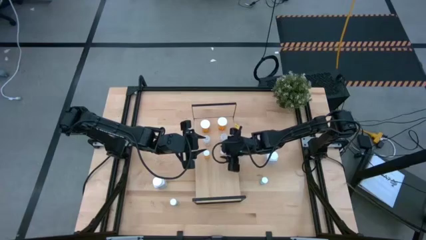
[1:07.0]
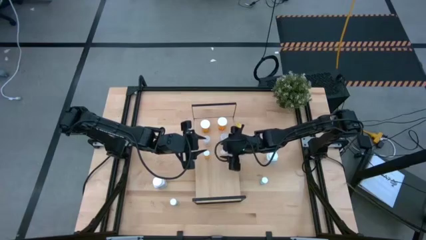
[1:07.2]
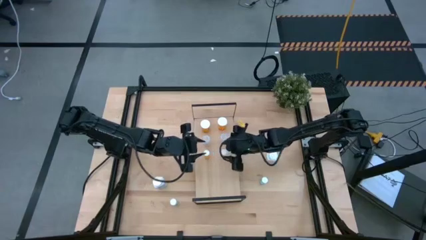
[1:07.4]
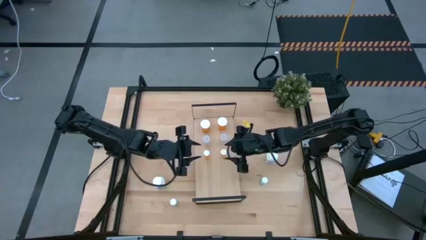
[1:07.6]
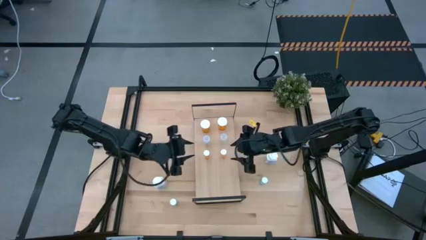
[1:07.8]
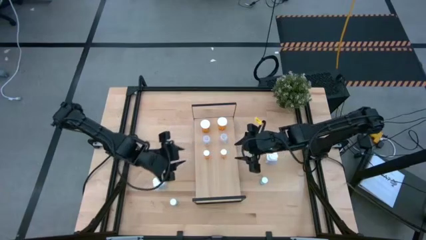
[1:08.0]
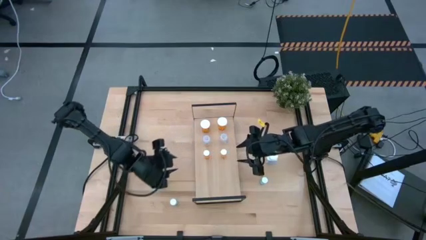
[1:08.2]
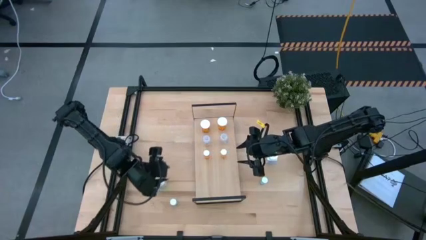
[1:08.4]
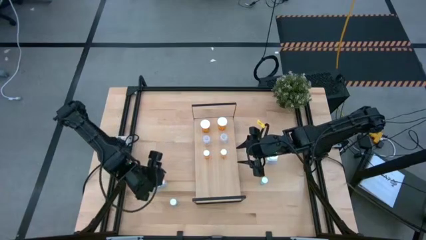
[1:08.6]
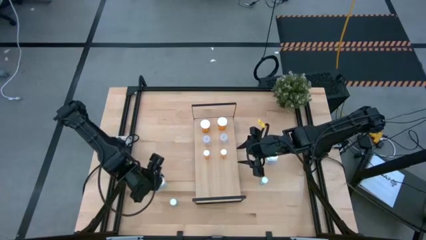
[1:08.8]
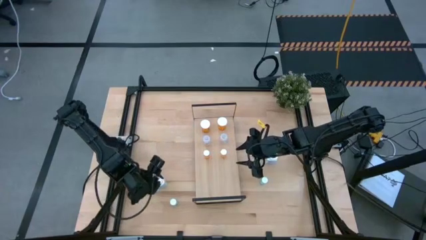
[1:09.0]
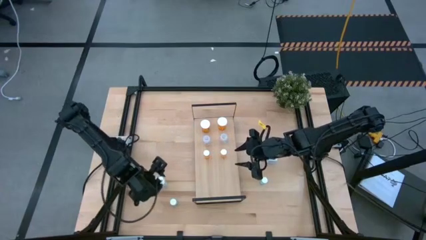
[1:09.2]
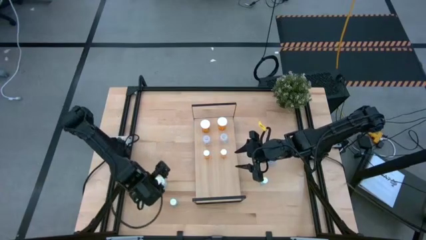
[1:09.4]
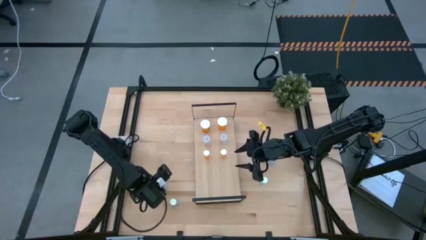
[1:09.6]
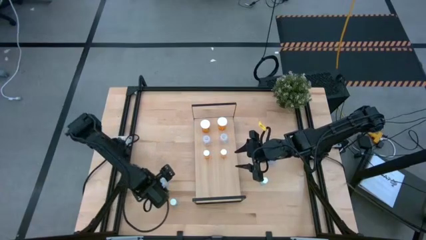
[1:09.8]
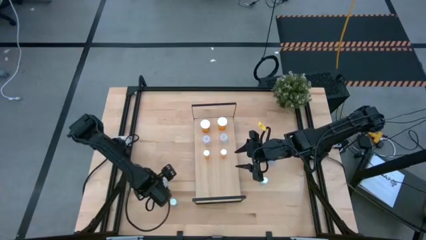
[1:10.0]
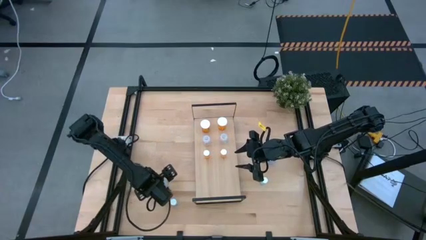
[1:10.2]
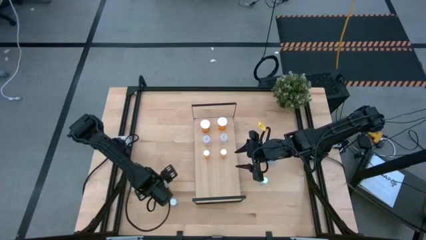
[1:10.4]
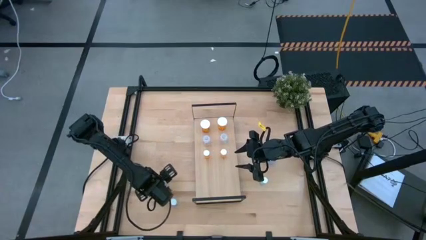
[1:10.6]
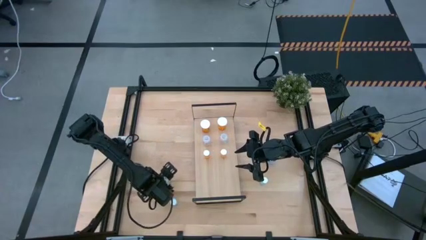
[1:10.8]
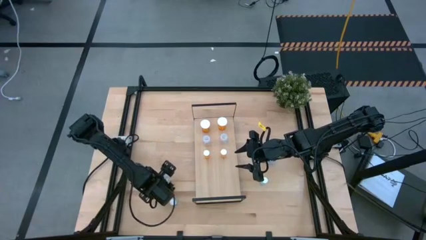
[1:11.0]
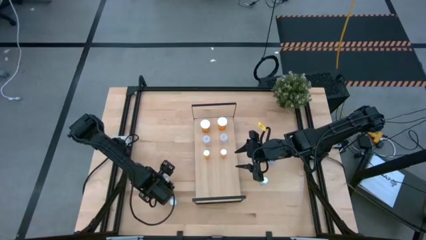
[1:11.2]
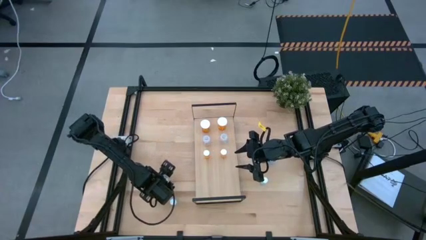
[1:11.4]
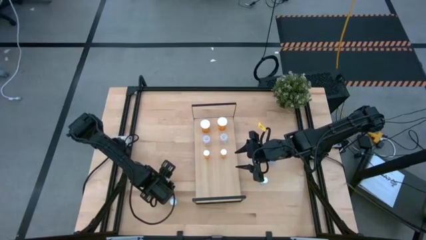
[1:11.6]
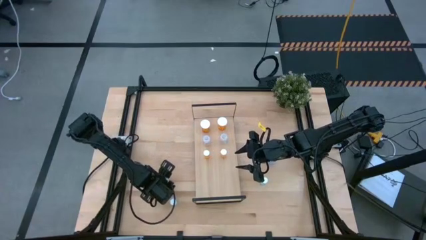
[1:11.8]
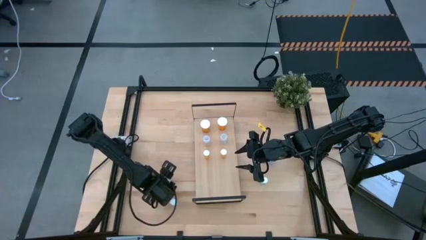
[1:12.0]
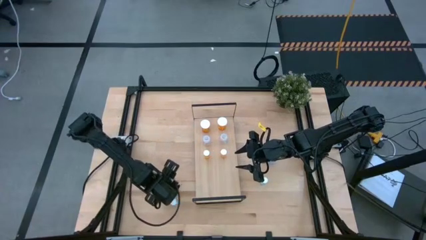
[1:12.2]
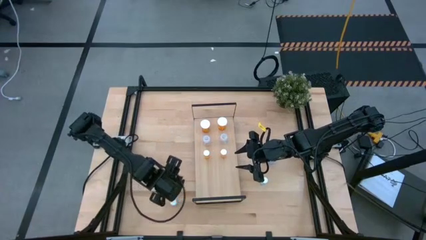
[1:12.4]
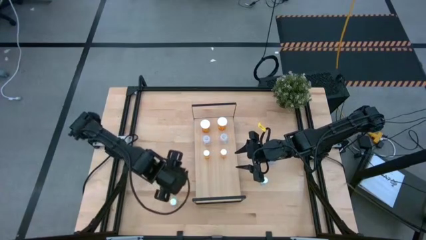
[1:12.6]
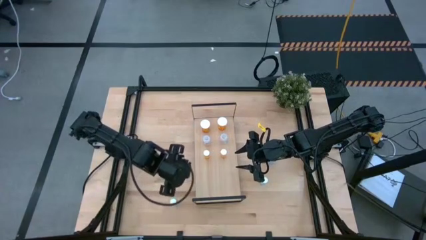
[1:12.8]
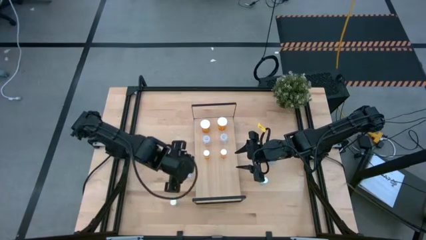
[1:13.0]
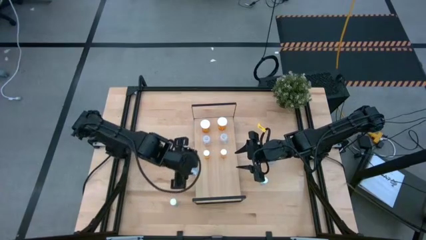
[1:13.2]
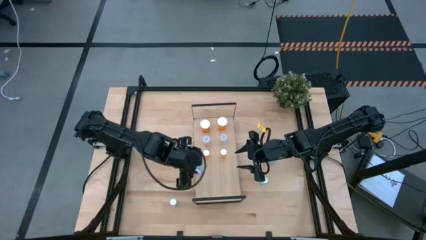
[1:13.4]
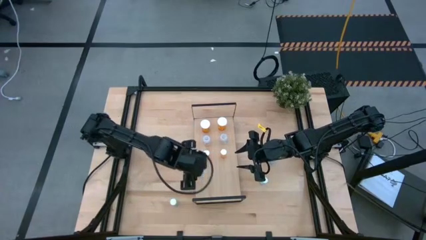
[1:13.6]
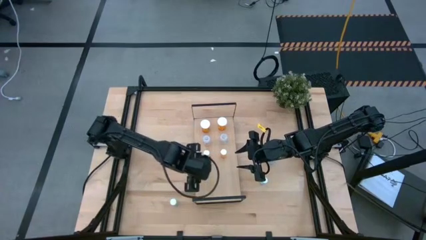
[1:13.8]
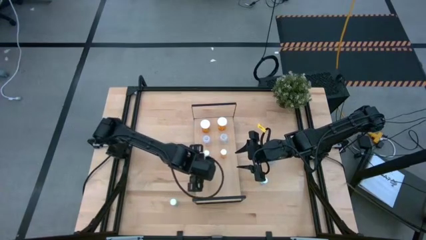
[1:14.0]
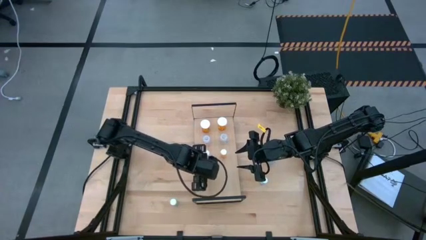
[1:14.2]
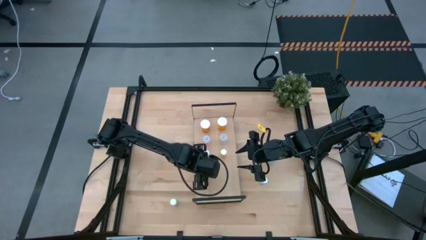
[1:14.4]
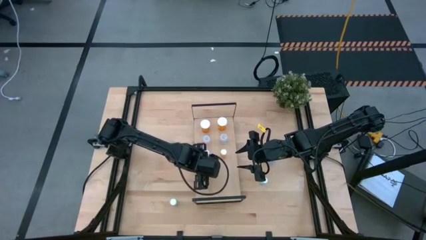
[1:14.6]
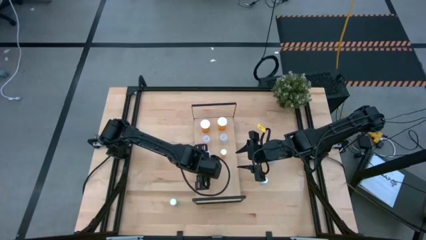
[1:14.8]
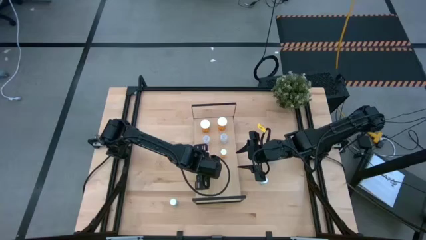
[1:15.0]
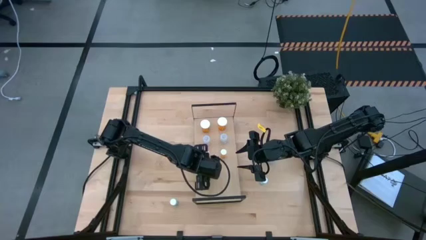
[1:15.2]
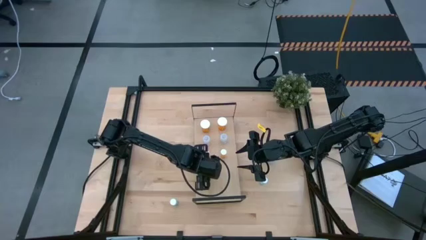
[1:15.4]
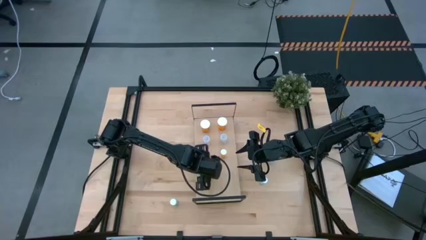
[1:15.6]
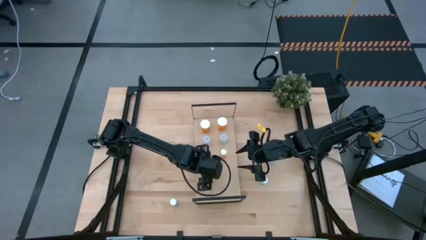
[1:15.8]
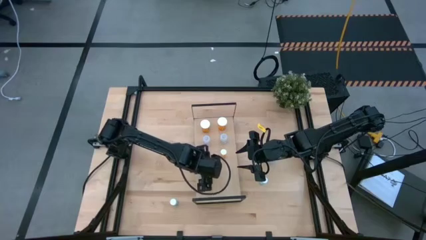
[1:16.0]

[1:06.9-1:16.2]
Task: Pick and place medicine bottles onto shelf by color
Put the left white blue medicine bottle on the shelf

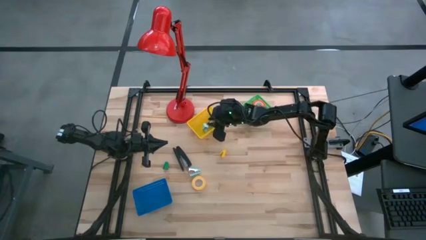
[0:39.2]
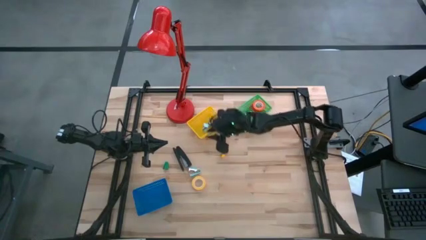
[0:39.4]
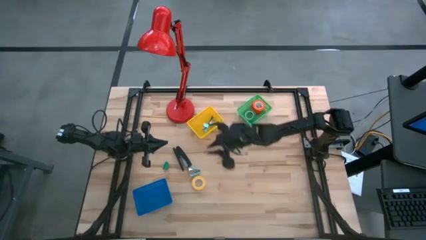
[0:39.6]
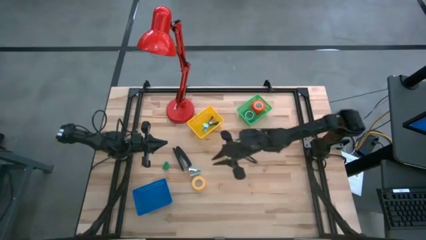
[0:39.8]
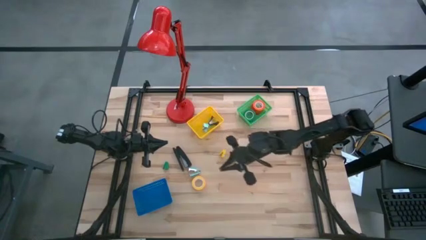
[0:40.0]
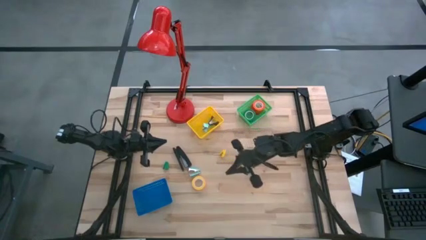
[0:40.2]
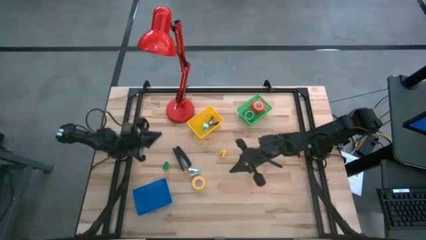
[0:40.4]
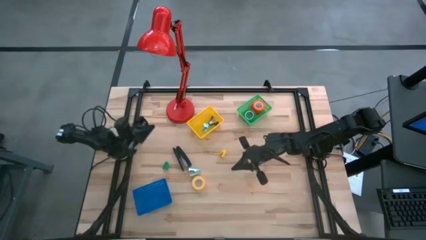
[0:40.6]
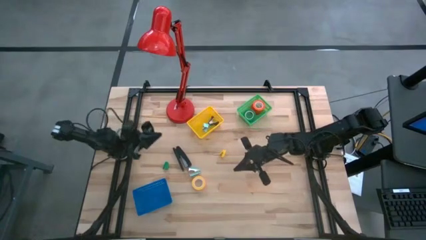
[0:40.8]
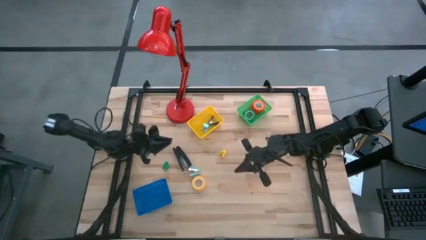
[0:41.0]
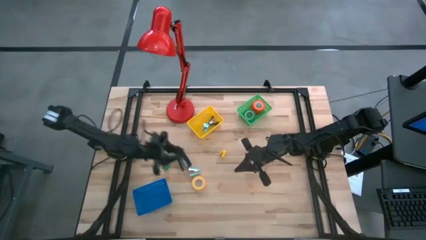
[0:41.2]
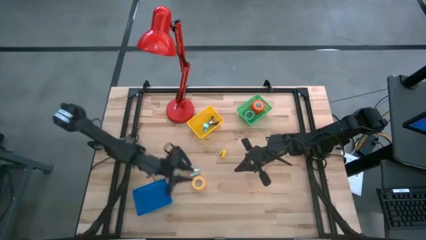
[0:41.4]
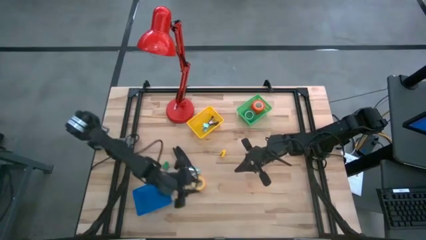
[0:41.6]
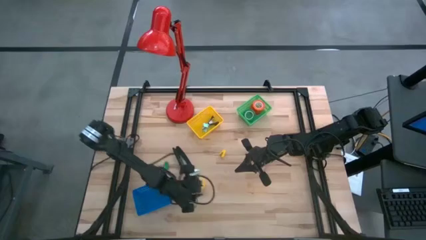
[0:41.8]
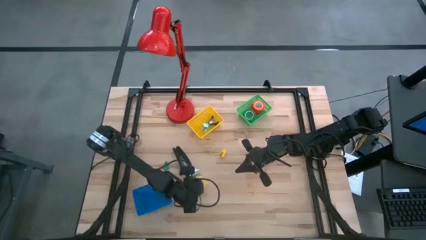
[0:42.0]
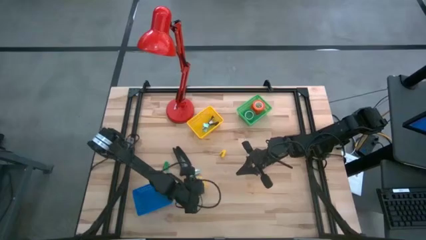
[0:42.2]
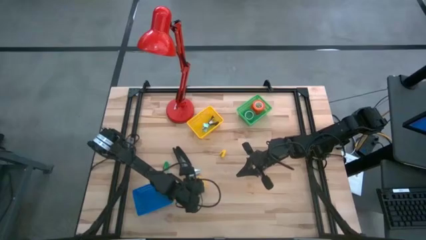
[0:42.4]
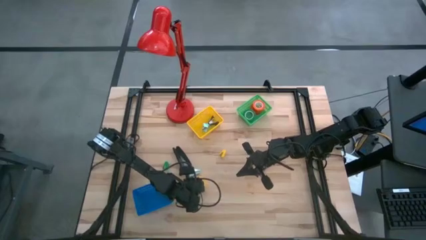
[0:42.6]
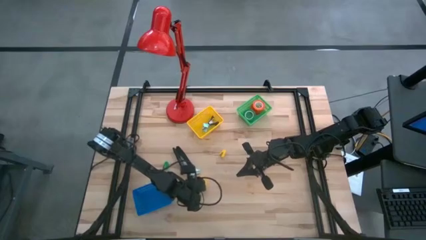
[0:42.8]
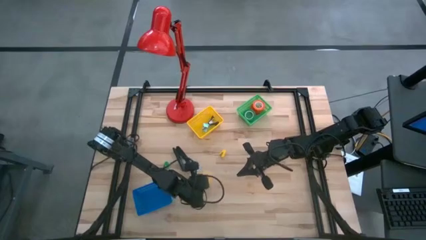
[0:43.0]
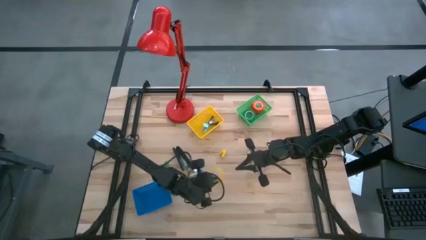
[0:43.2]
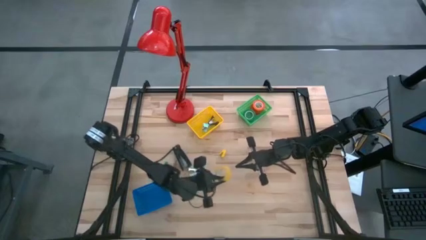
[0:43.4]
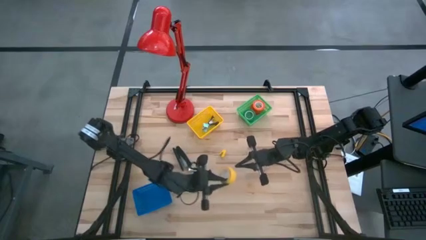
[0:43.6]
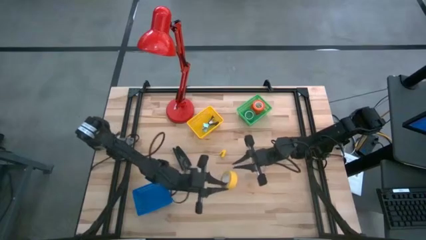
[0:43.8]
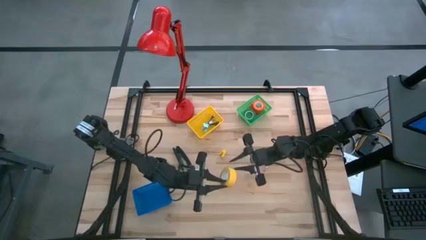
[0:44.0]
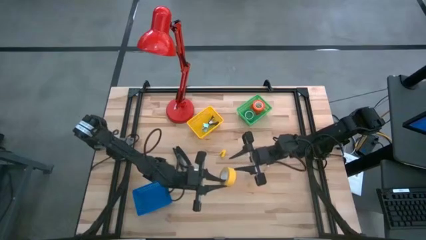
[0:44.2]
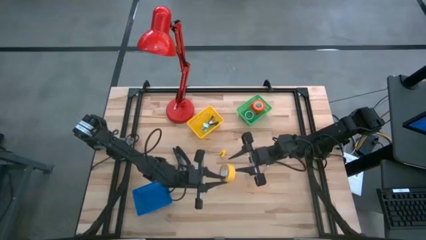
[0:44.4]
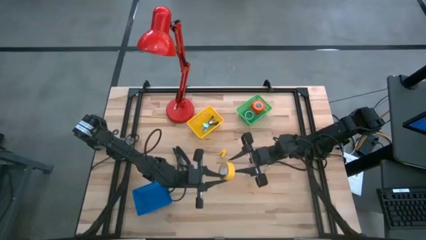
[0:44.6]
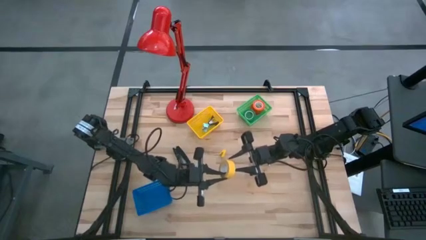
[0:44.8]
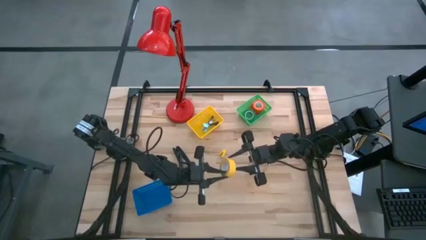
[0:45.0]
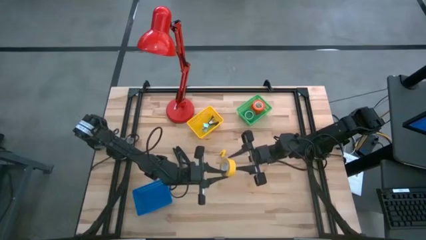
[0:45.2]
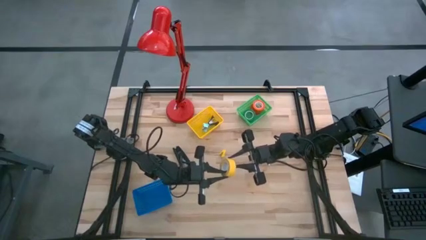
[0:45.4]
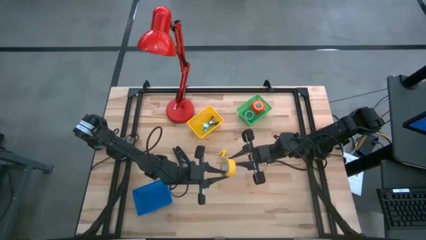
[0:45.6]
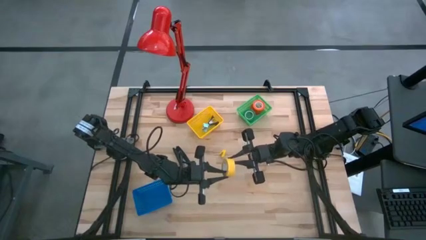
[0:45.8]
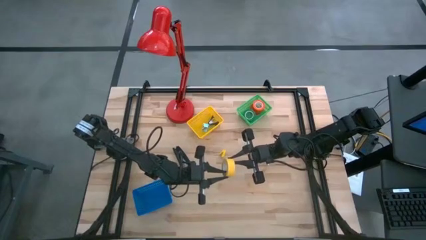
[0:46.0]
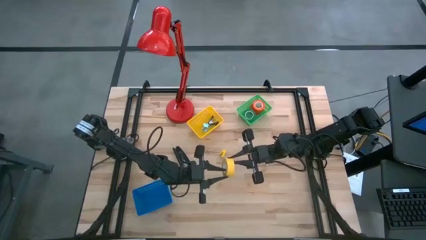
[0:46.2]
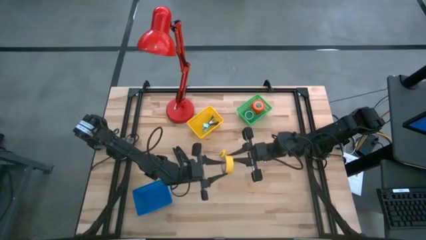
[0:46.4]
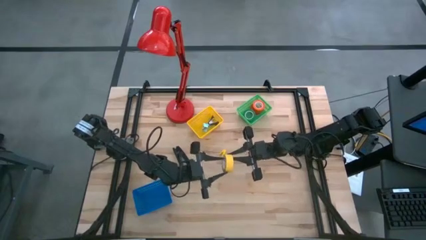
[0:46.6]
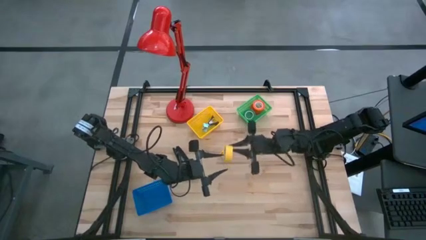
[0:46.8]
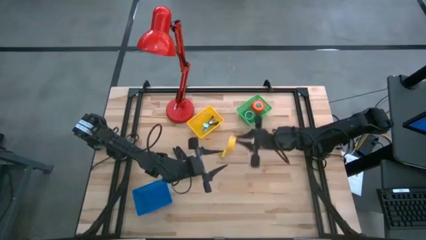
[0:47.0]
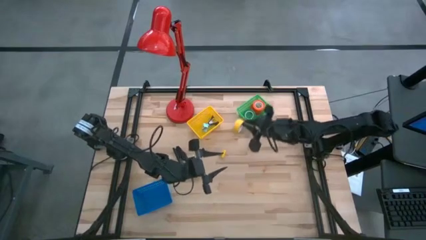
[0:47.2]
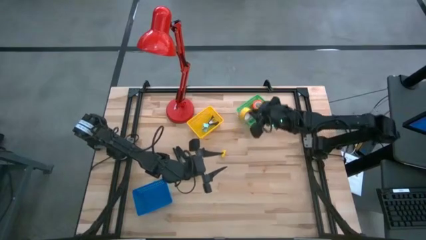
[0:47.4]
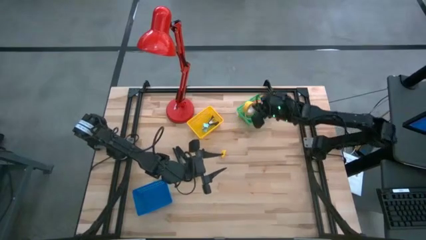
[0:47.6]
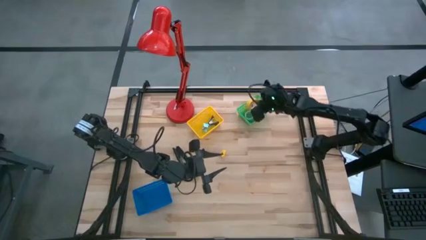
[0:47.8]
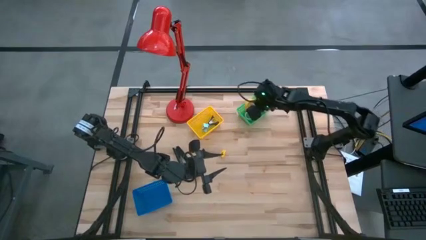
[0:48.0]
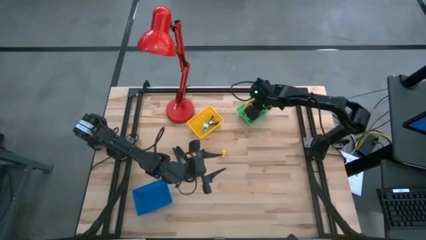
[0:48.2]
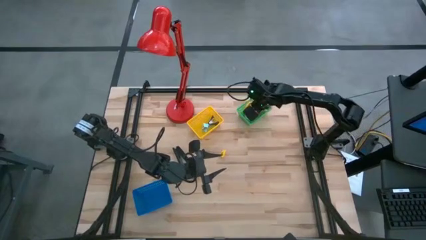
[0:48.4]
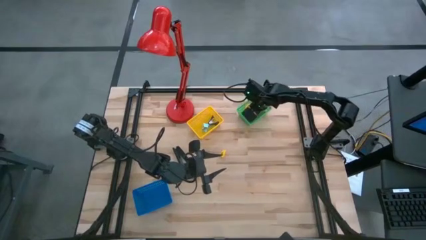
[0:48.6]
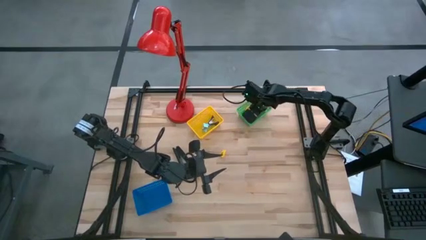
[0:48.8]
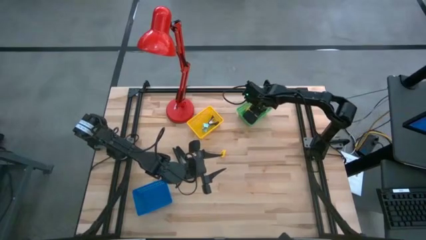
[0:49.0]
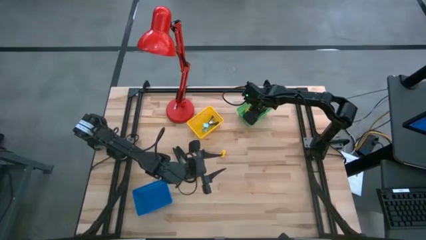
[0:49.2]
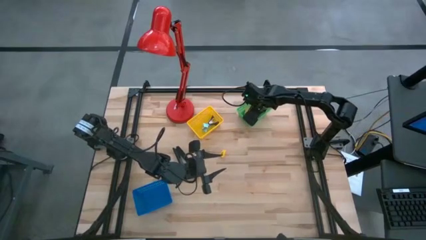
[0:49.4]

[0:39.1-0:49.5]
Task: Pick and place Stapler, Stapler remover, tape
Put the yellow tape into the green bin
